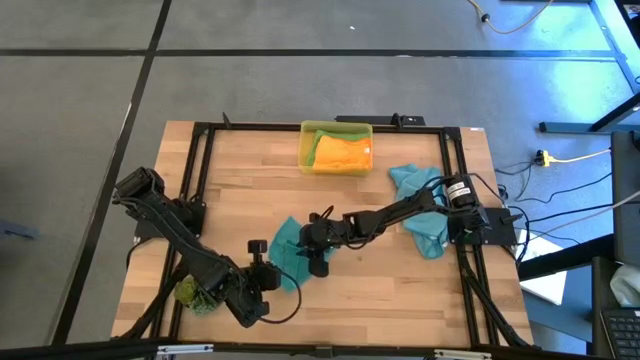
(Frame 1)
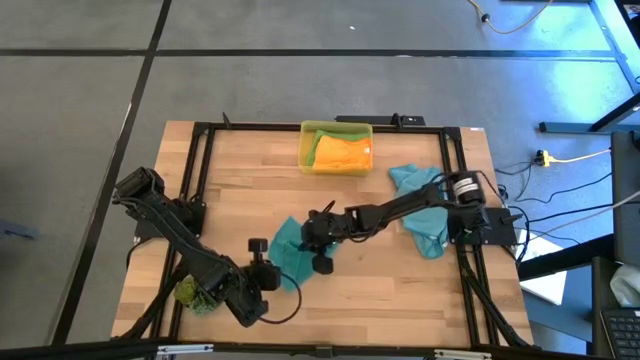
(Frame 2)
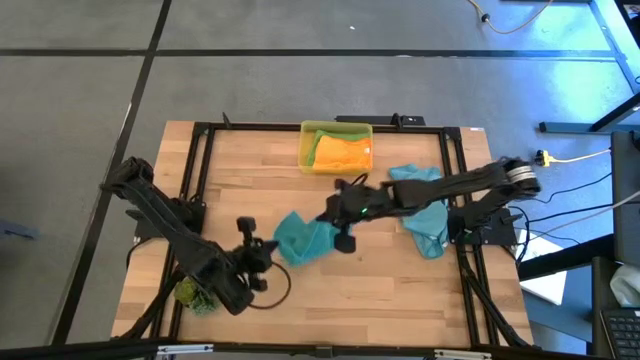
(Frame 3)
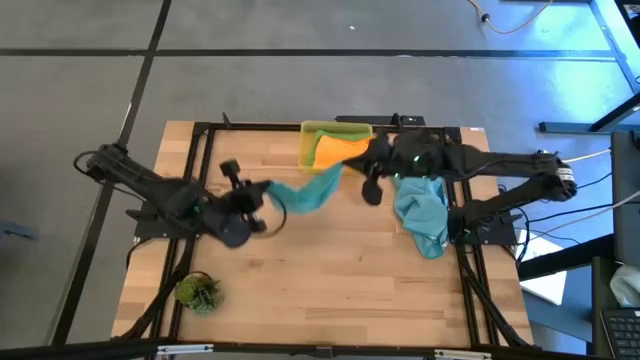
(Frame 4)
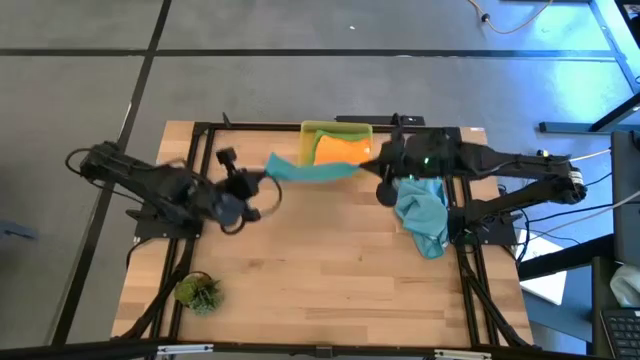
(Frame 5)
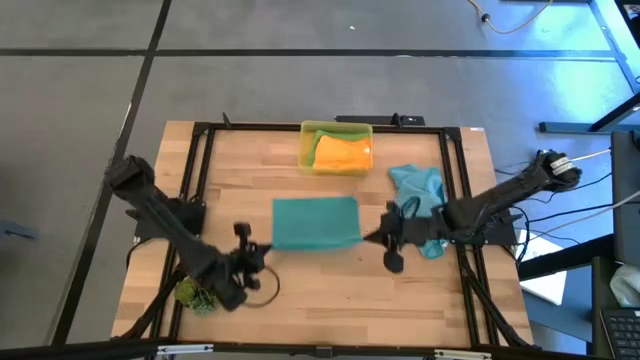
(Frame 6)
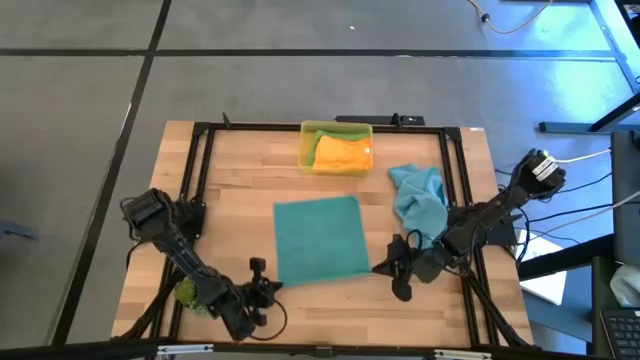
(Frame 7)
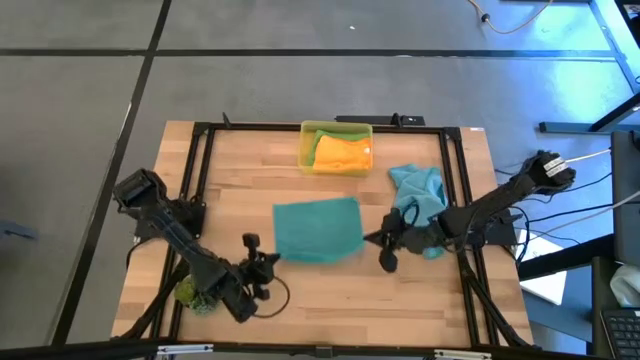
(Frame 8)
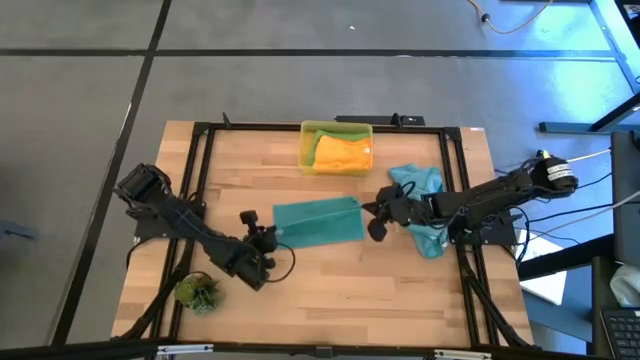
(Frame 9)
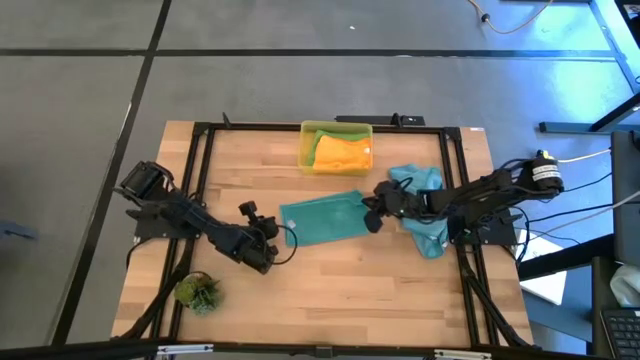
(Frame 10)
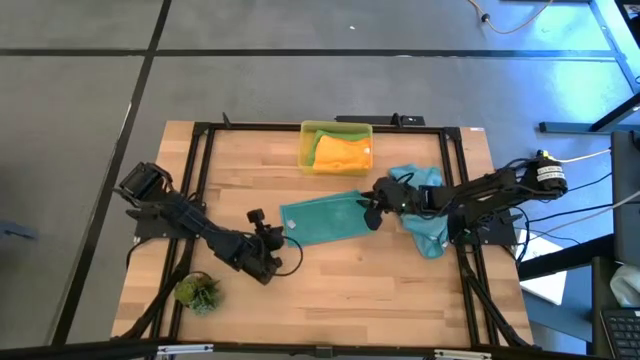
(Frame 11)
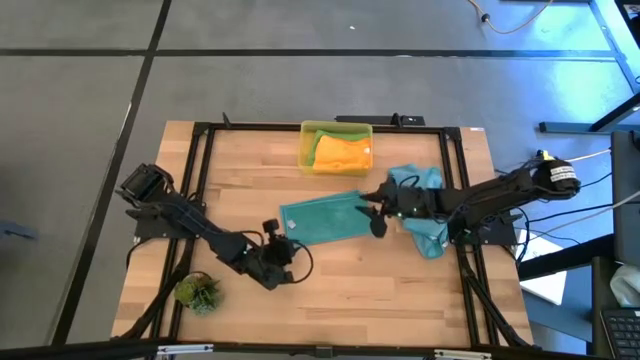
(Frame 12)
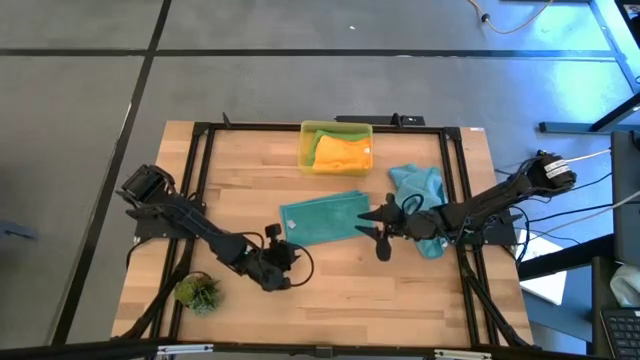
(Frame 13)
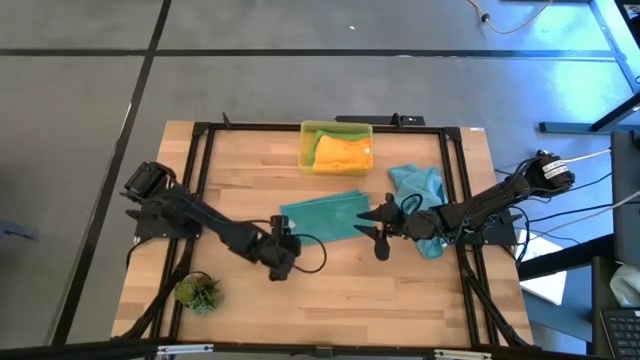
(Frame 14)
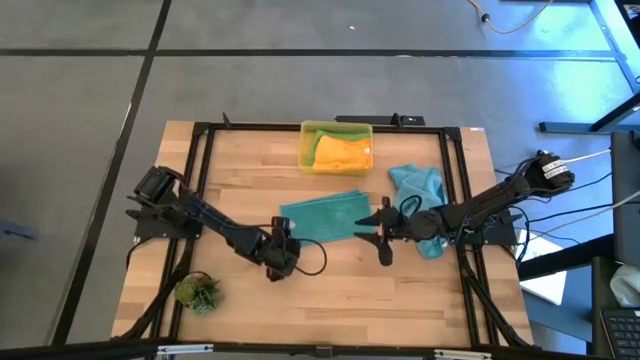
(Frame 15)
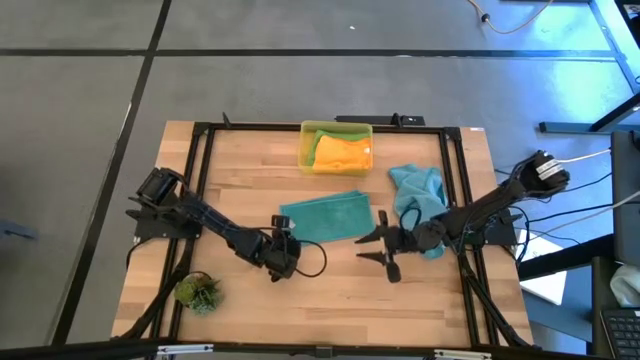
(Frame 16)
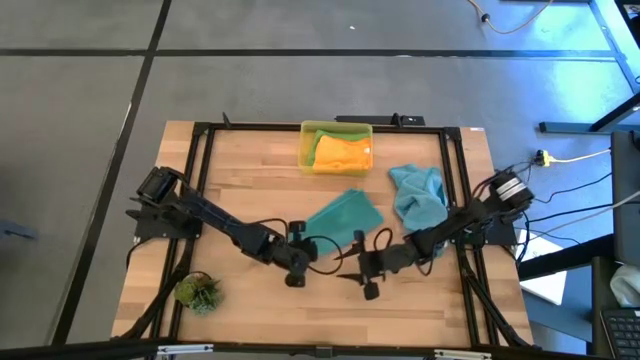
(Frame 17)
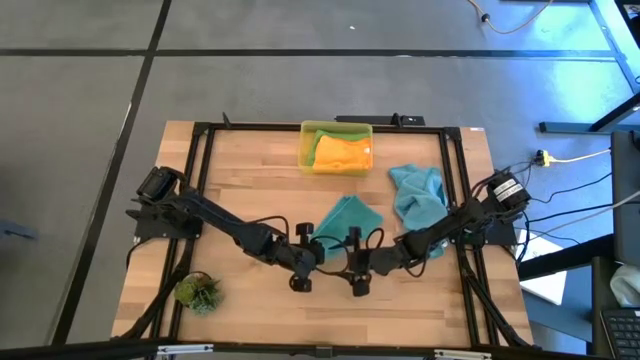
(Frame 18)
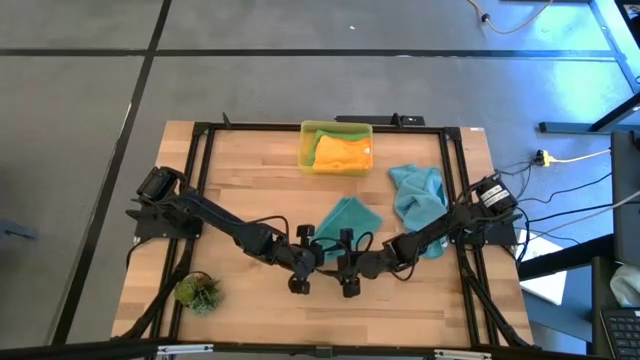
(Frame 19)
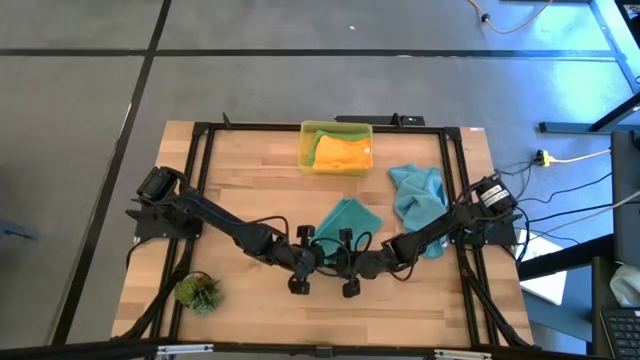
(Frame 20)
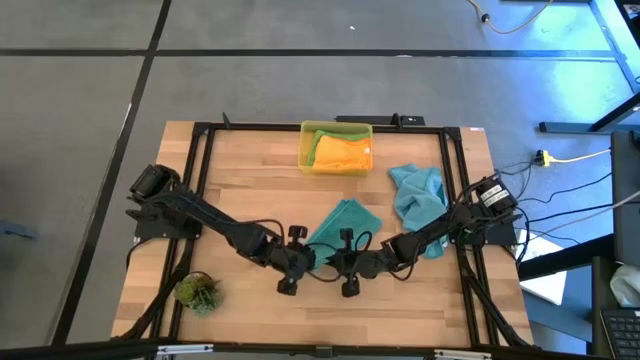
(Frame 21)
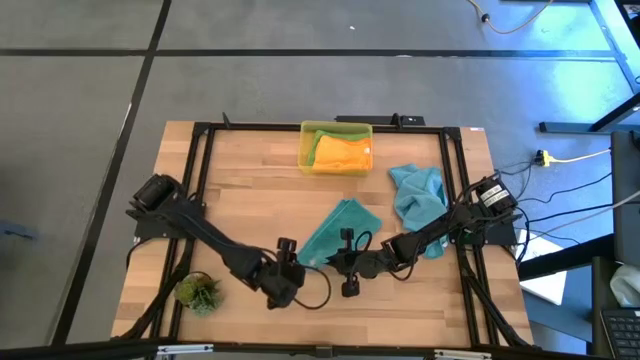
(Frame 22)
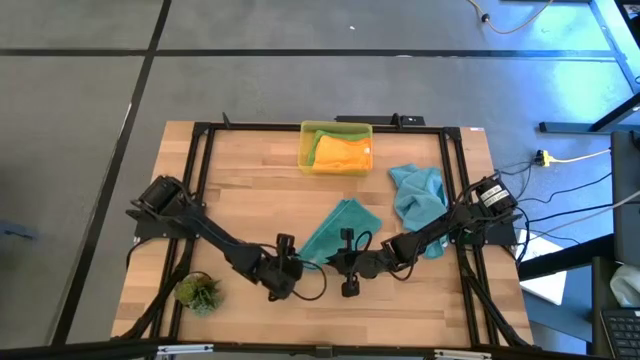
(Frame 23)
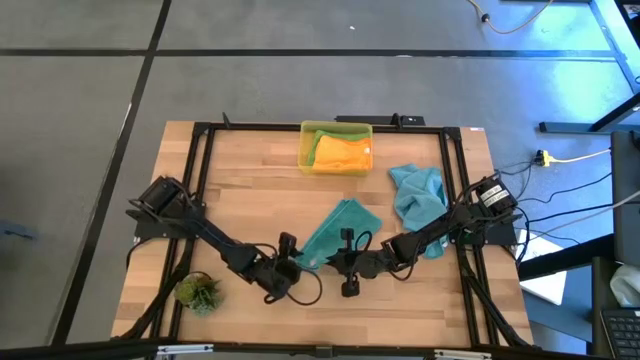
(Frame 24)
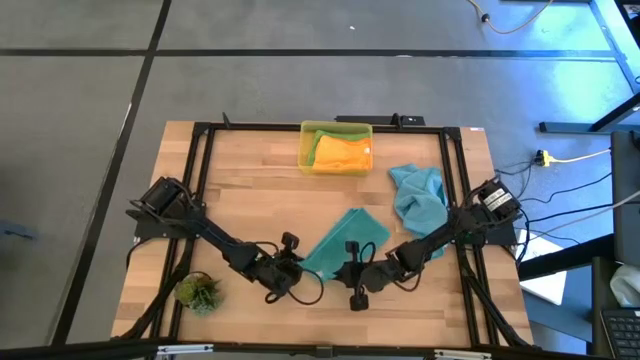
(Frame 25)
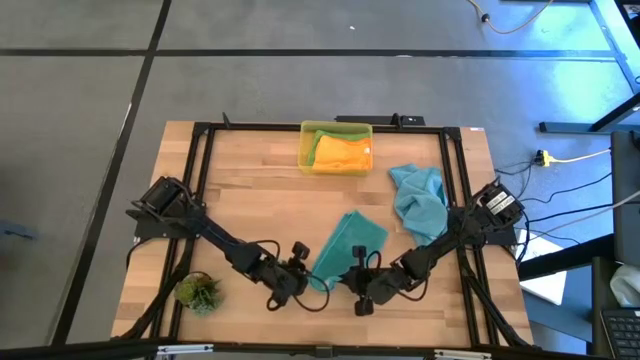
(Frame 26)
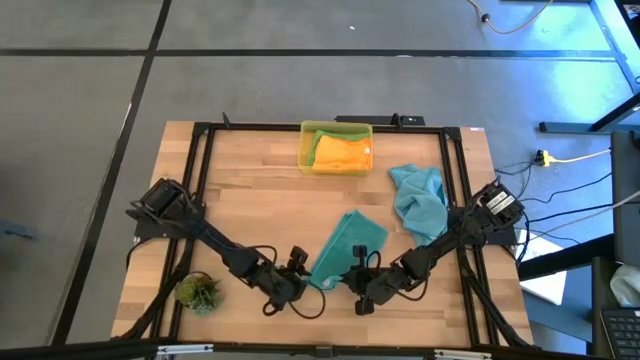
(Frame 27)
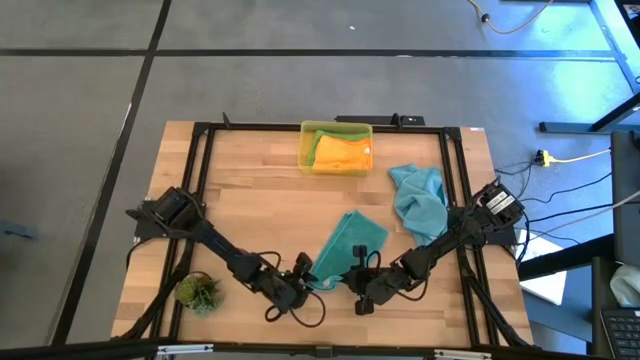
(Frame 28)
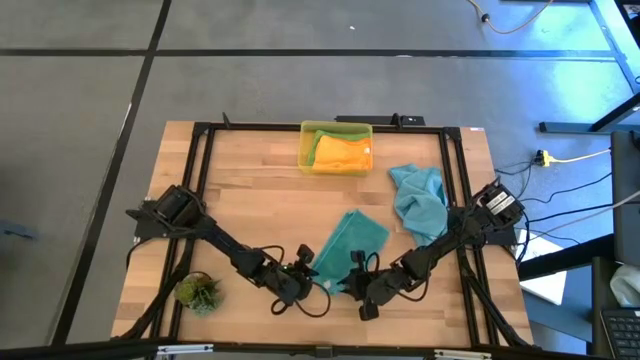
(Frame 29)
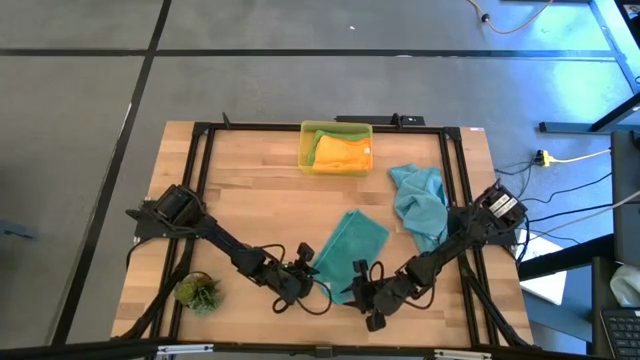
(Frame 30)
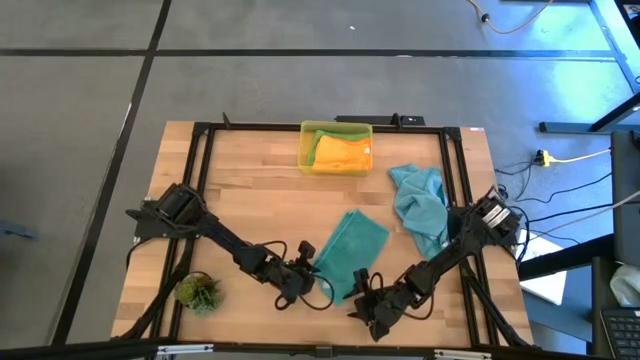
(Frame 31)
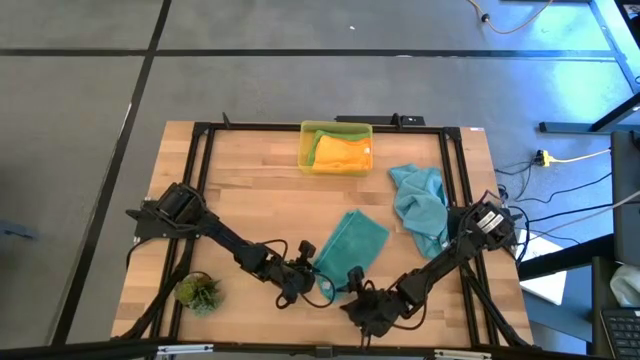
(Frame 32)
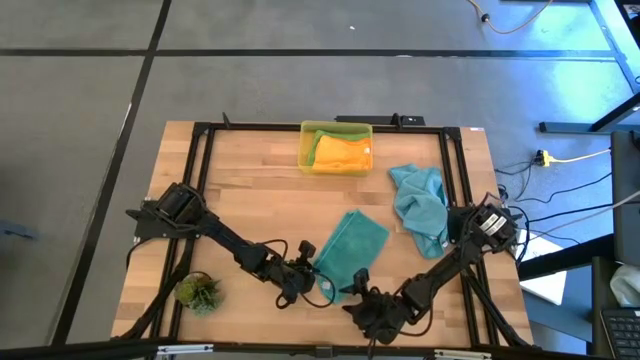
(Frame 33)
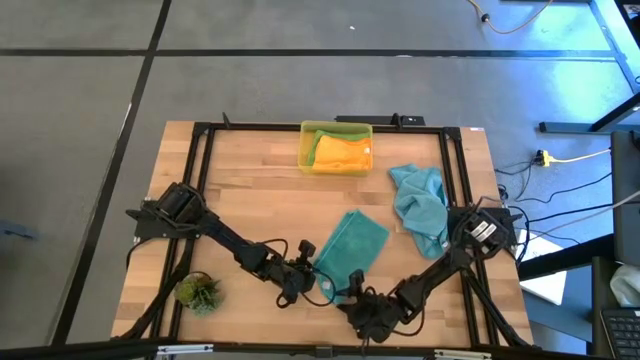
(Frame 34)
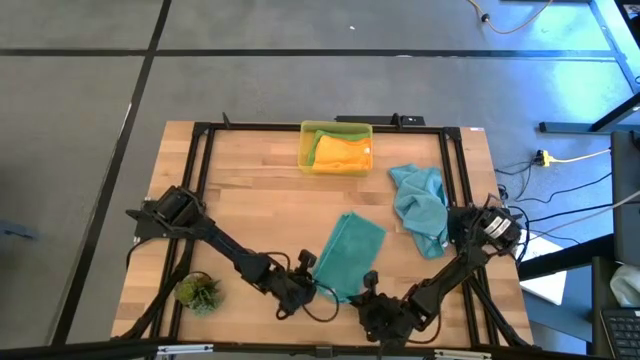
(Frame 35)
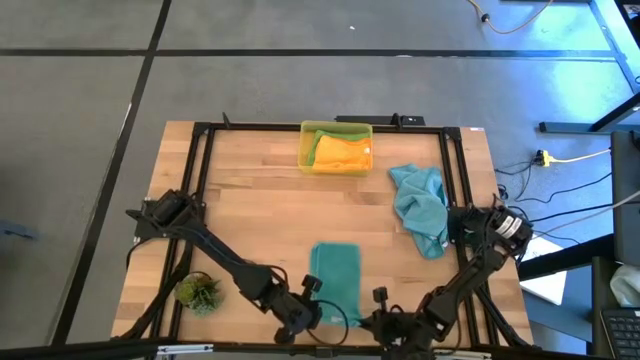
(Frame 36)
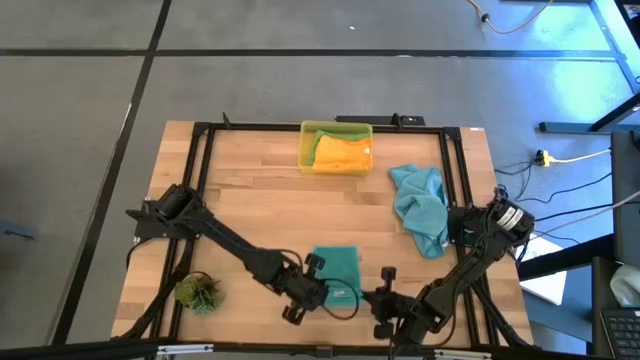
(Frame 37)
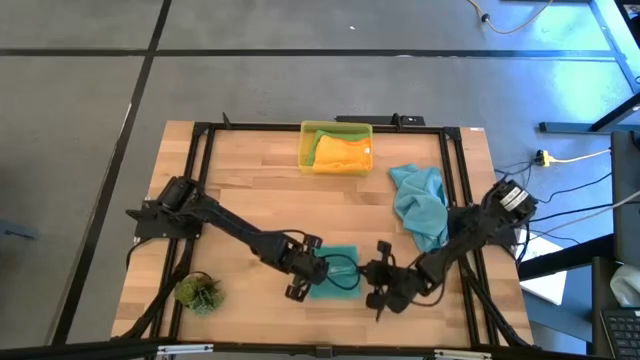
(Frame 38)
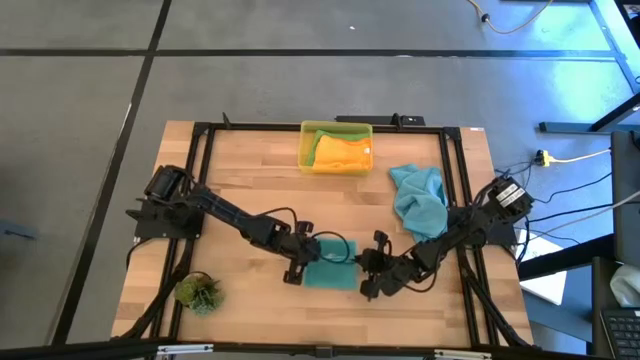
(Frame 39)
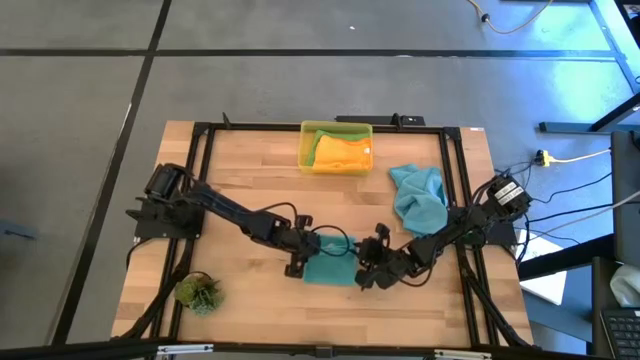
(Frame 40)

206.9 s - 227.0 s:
Task: Fold microfiber towels
Fold the left blue microfiber cloth

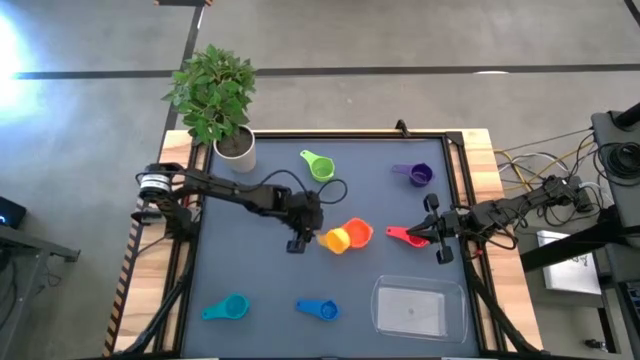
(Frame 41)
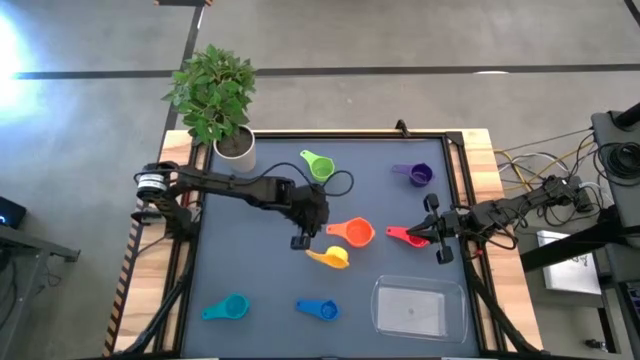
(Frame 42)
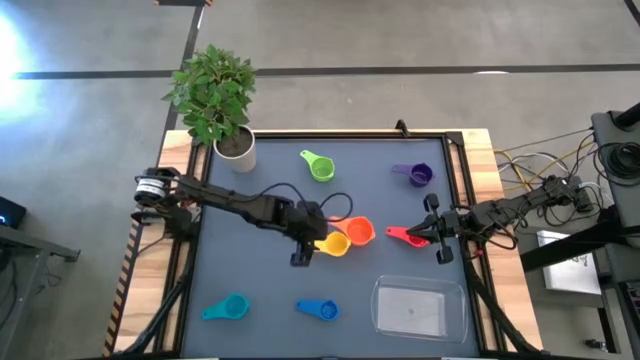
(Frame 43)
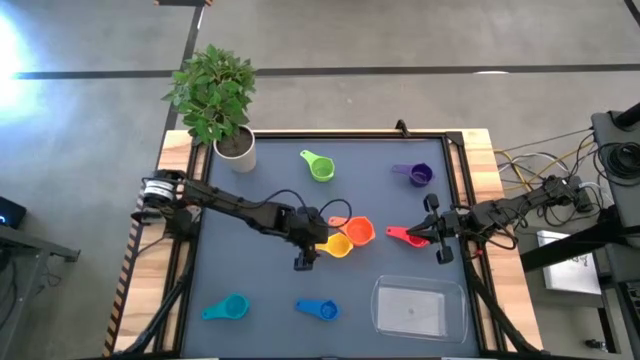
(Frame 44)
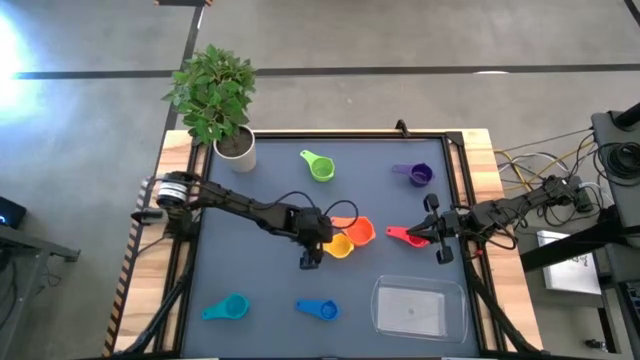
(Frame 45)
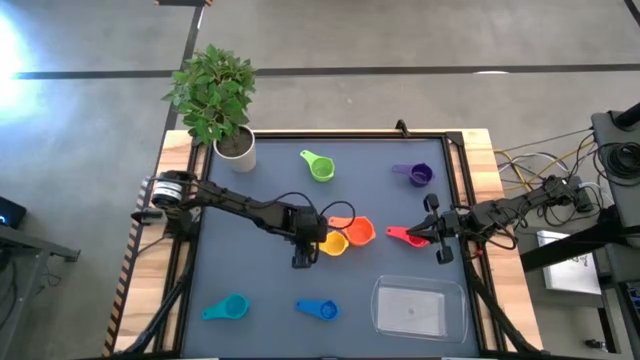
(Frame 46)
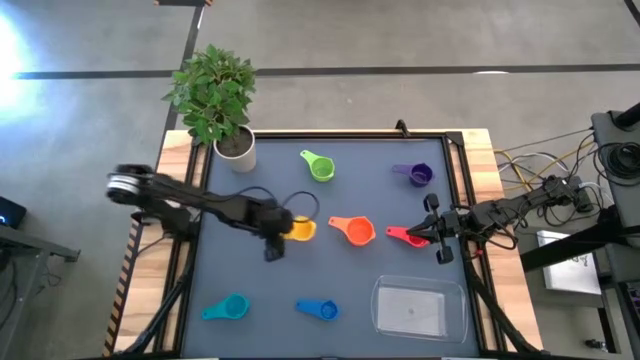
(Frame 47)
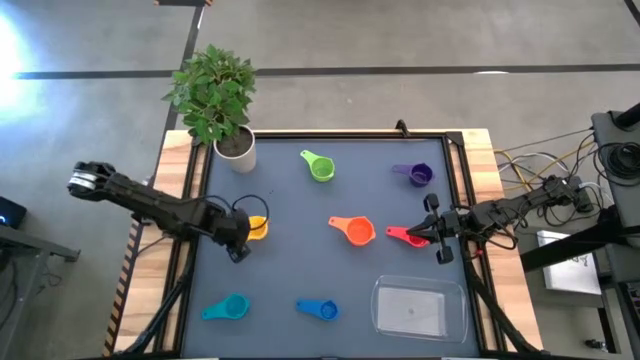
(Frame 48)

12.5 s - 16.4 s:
Task: Nest measuring cups in basket
Move the yellow measuring cup to the middle left of the table
